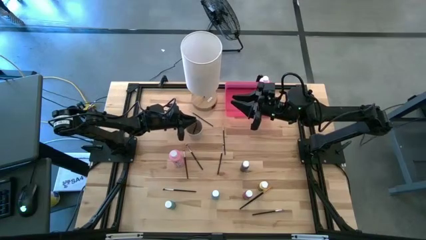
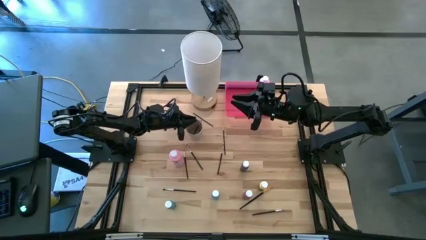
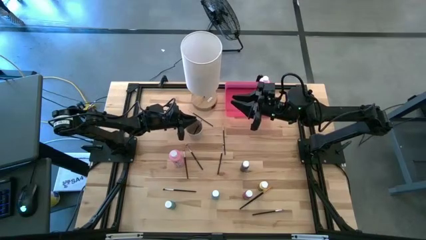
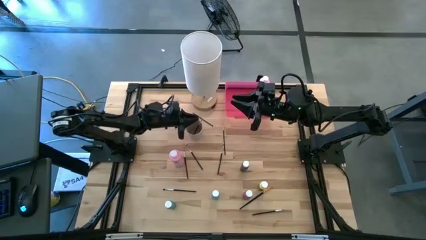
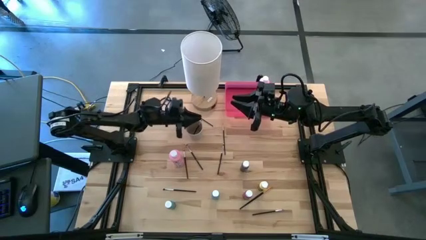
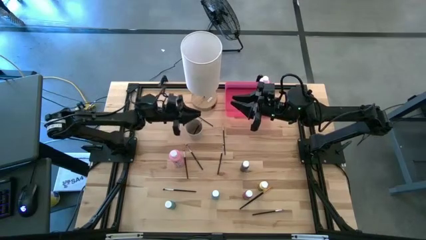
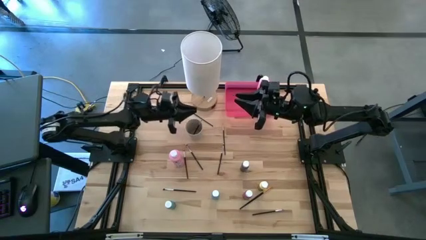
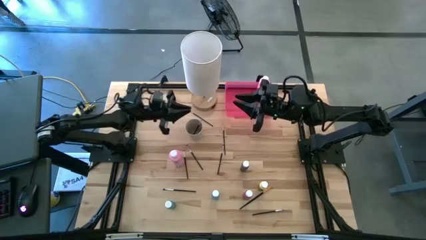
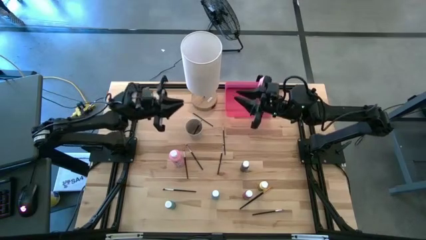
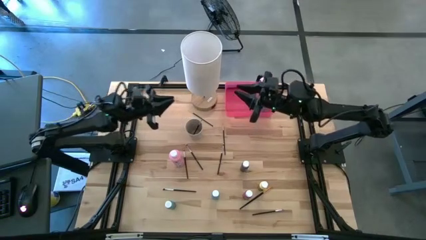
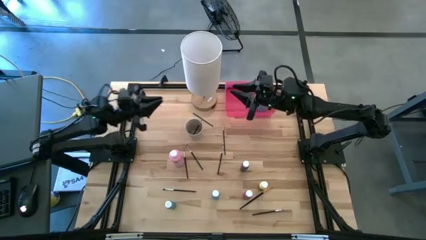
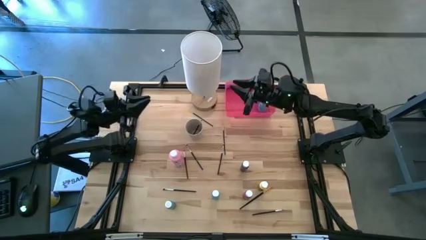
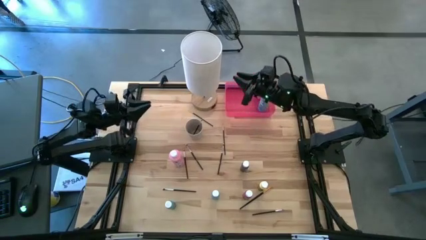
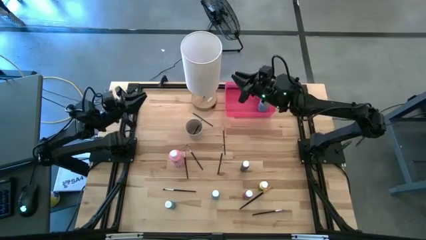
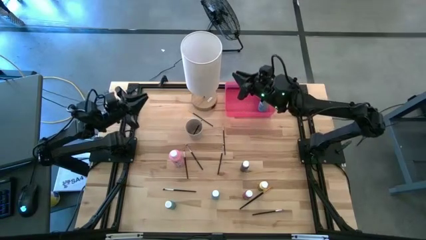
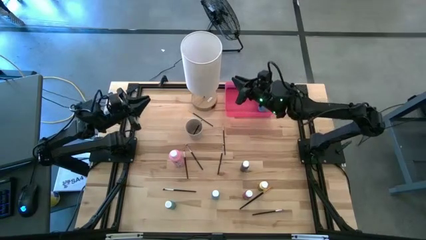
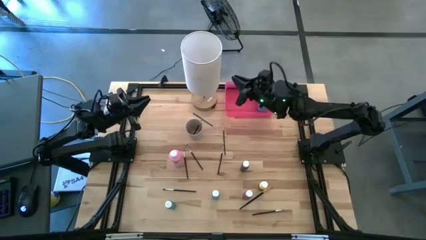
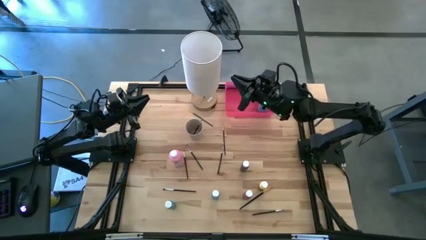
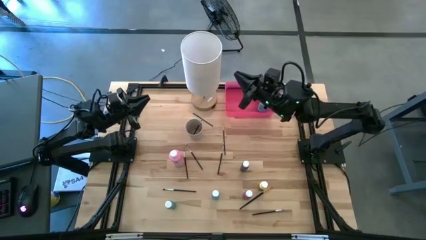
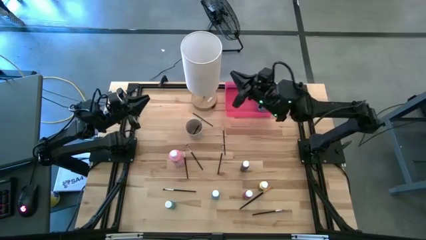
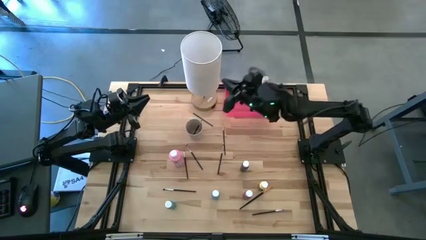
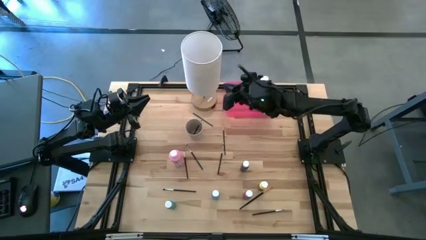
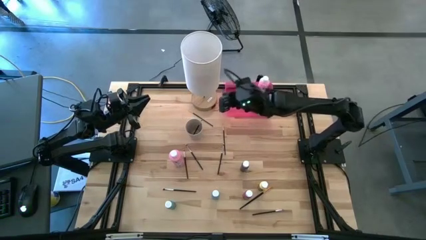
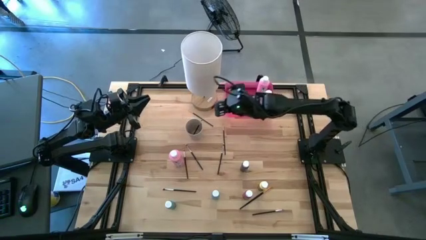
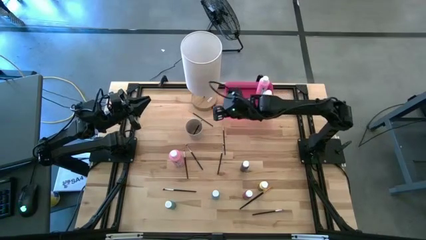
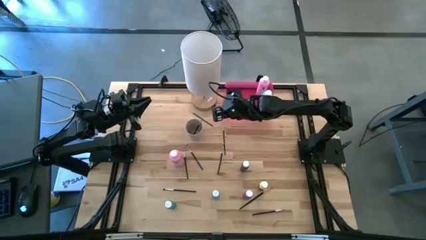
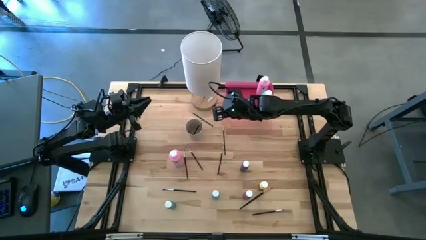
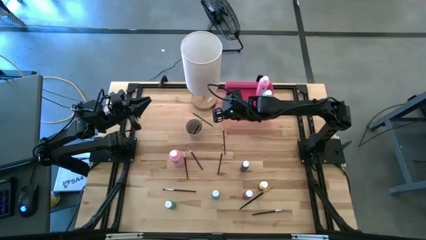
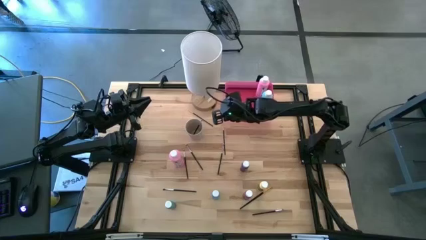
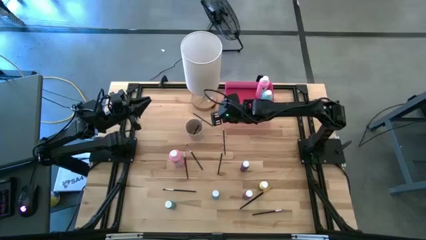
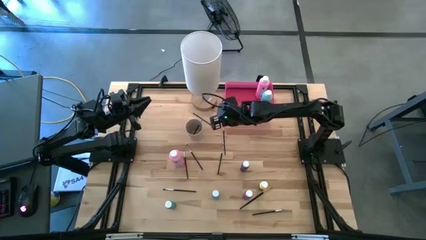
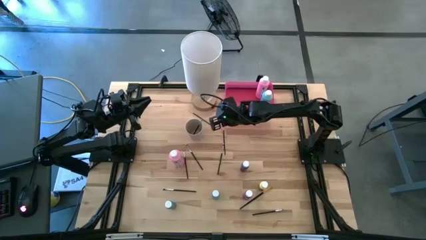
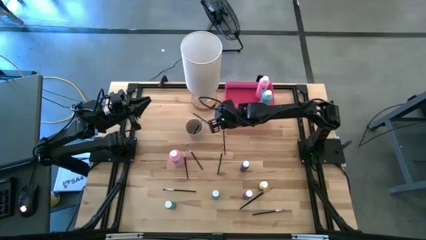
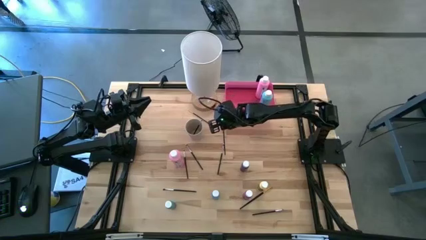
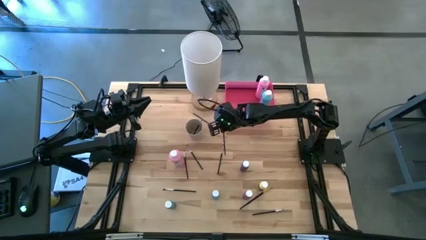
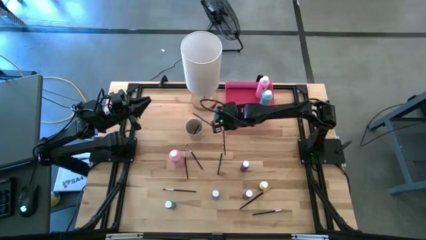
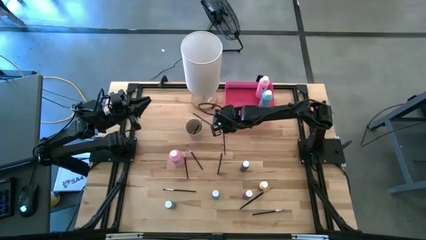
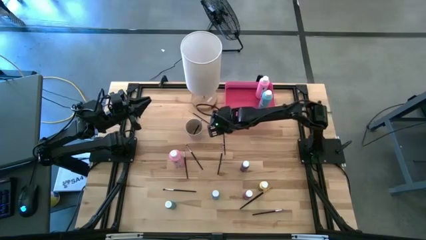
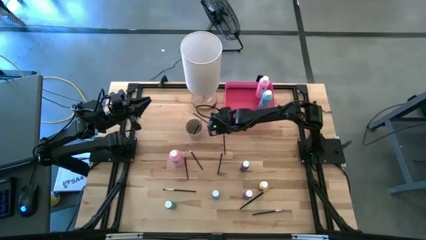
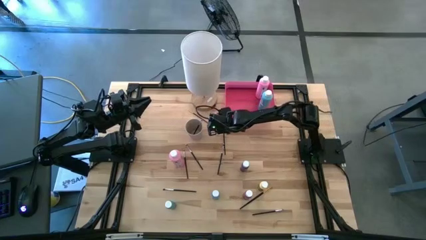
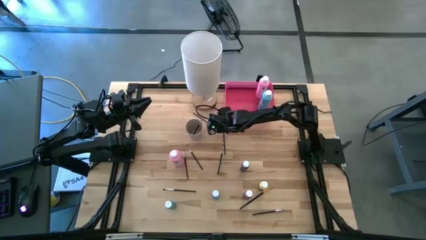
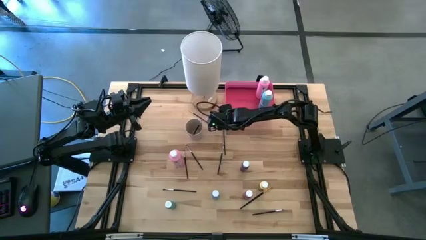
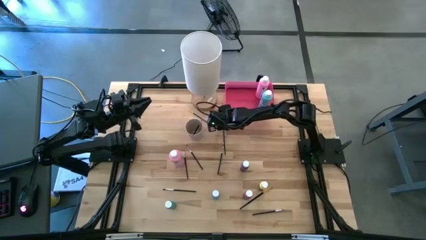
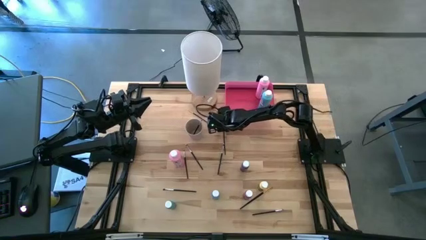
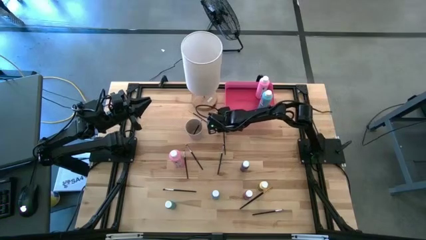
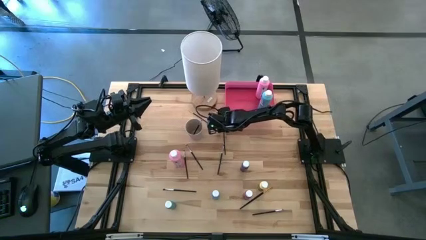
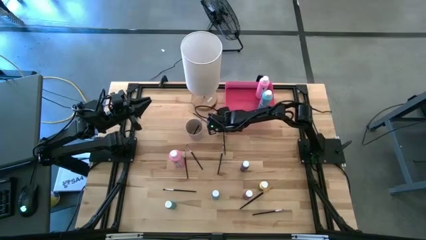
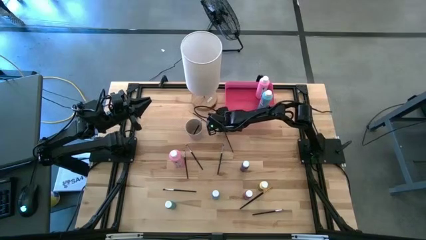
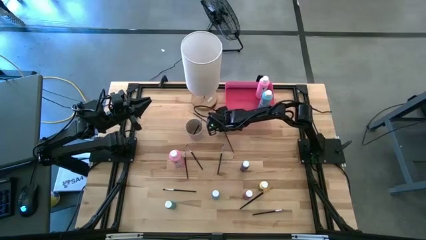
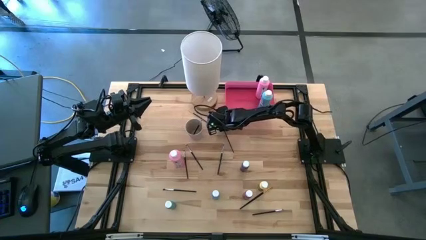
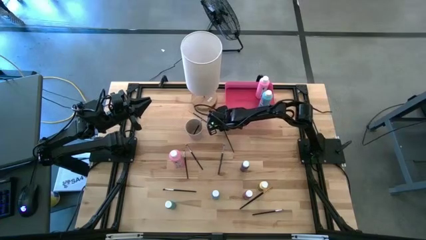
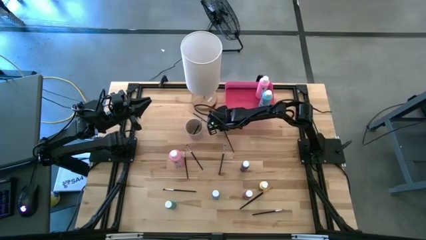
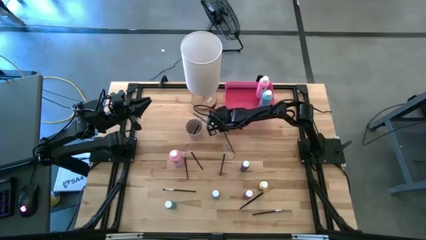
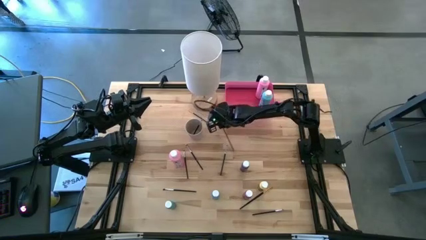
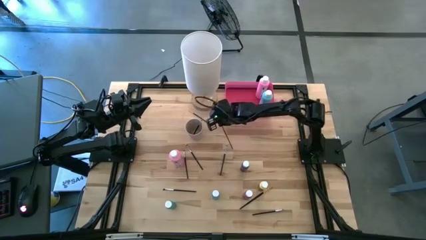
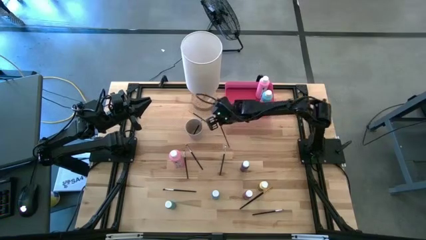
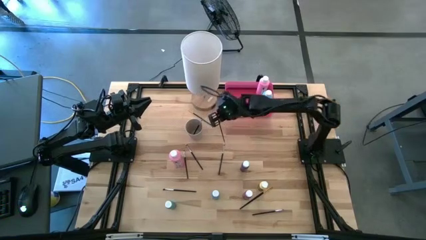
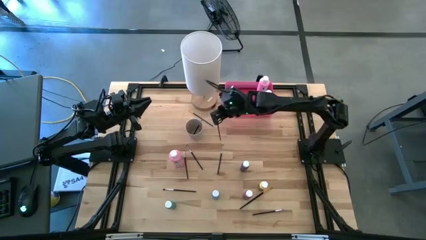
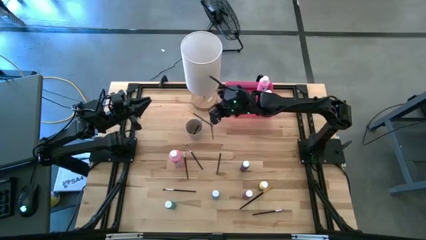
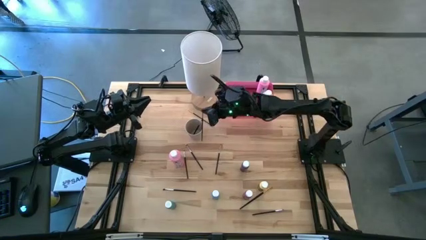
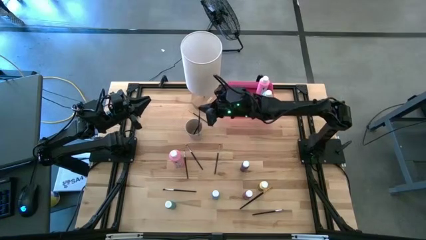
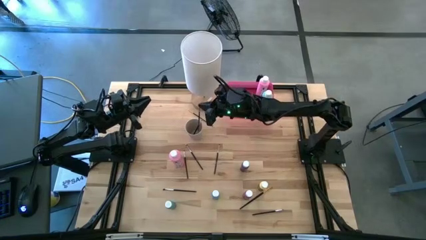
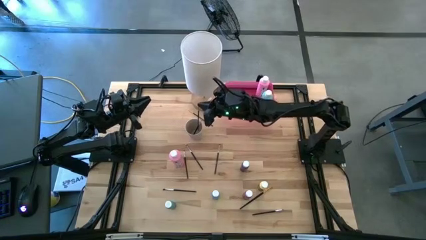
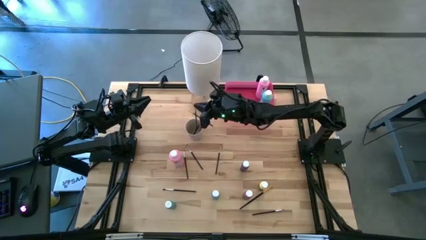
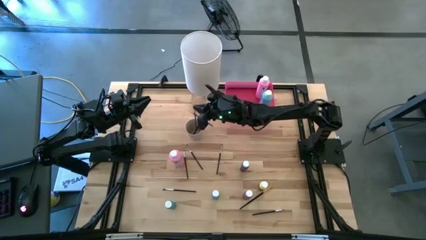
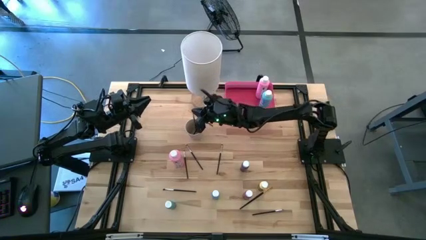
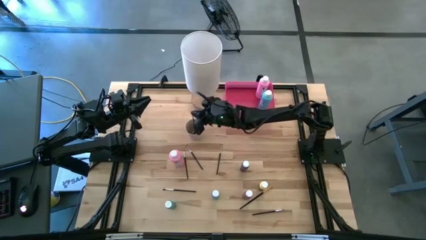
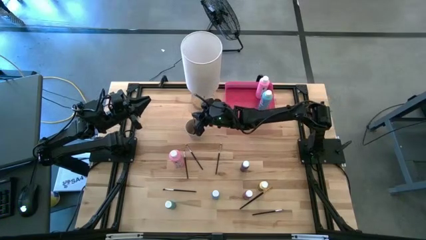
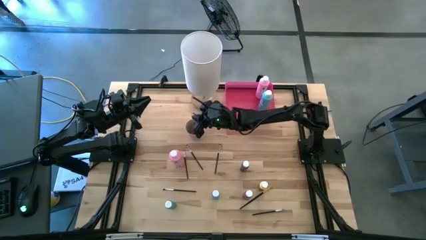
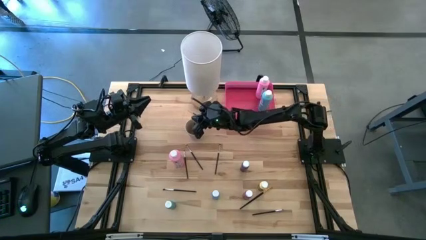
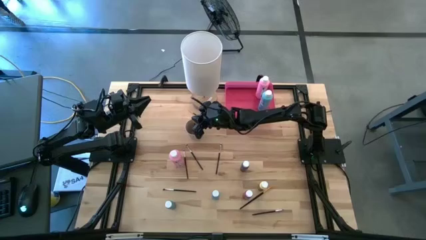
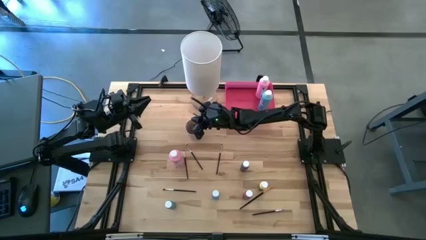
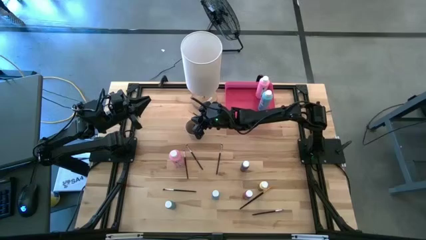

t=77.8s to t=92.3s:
Task: Pick & Place Paint Supplies
Put the golden paint brush into the white cup
